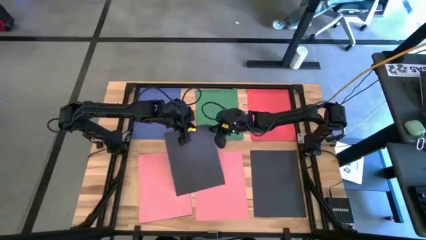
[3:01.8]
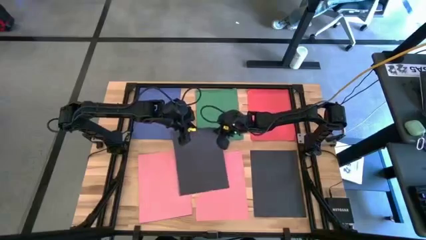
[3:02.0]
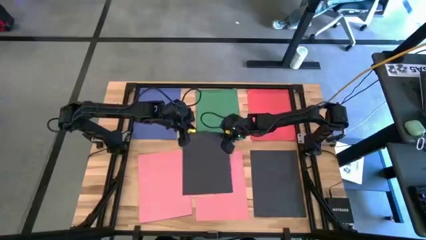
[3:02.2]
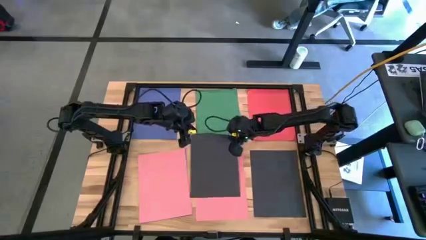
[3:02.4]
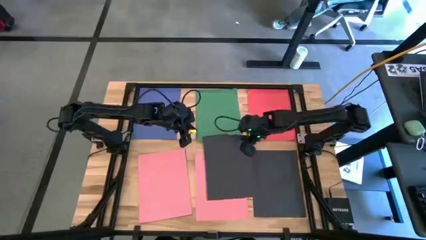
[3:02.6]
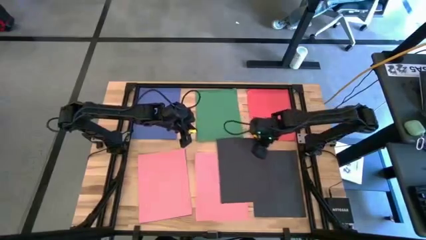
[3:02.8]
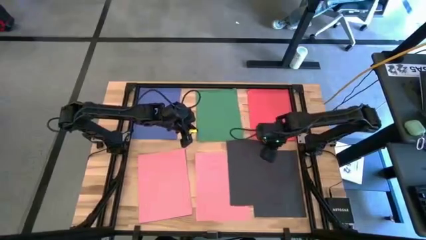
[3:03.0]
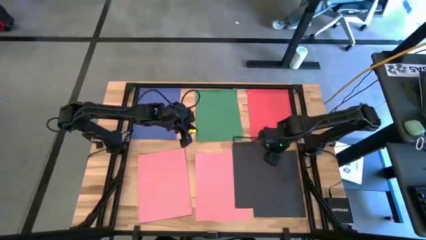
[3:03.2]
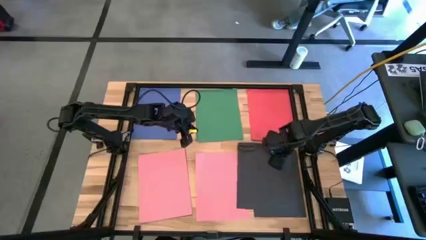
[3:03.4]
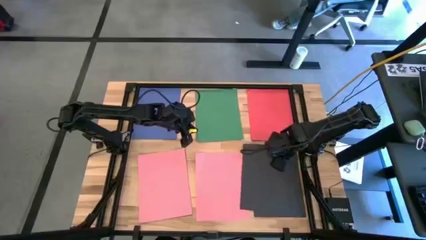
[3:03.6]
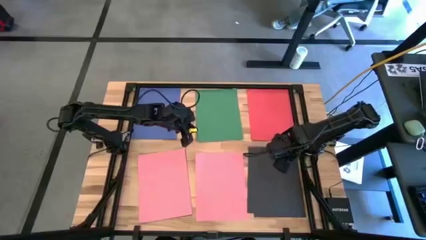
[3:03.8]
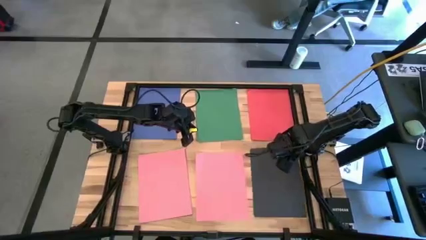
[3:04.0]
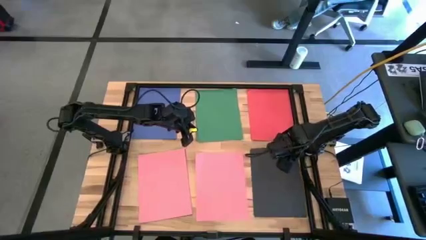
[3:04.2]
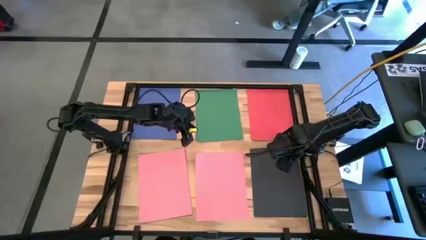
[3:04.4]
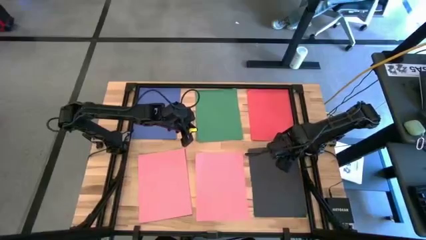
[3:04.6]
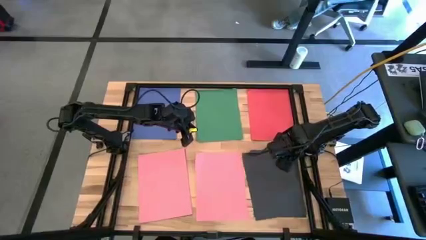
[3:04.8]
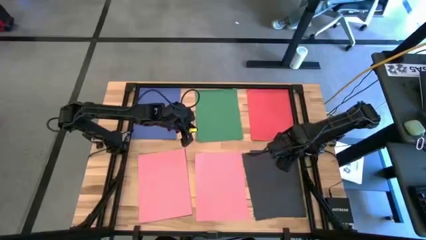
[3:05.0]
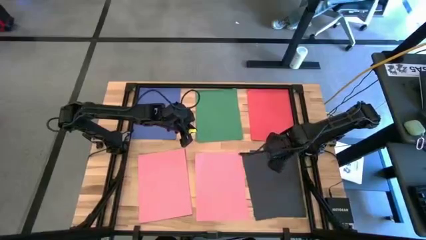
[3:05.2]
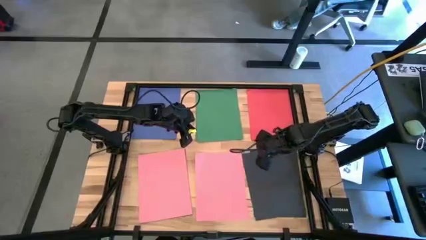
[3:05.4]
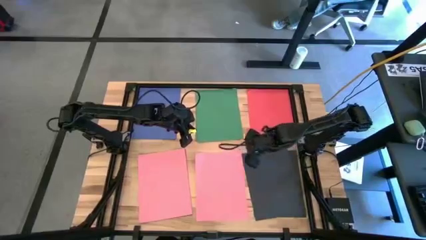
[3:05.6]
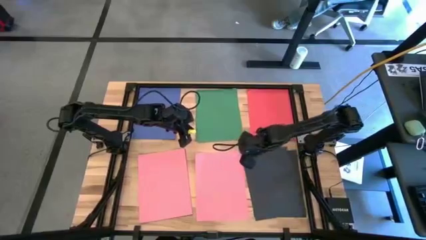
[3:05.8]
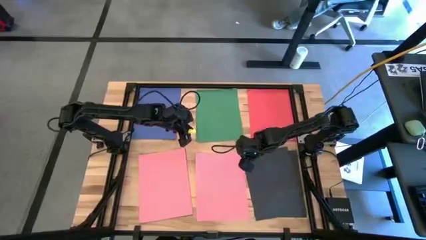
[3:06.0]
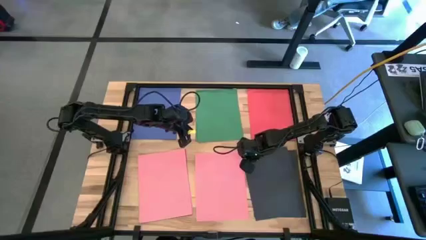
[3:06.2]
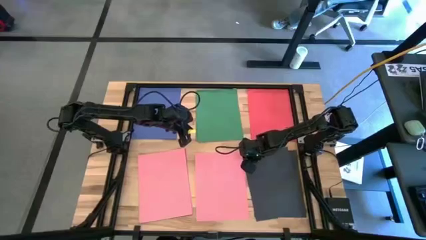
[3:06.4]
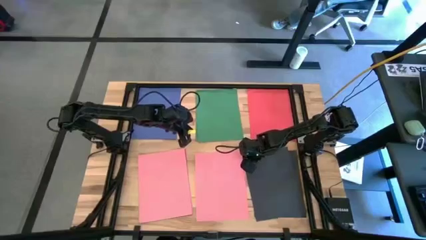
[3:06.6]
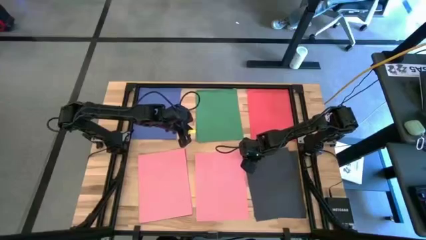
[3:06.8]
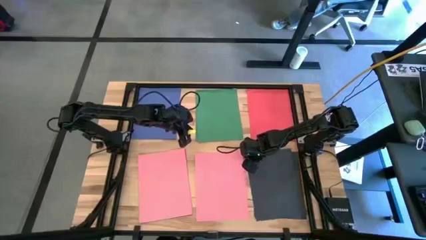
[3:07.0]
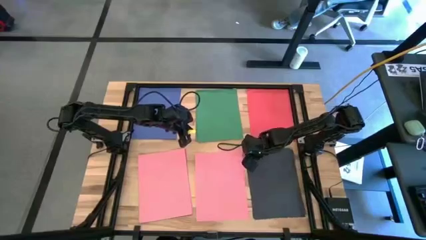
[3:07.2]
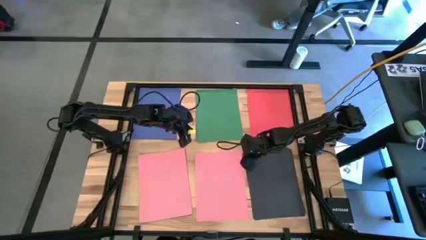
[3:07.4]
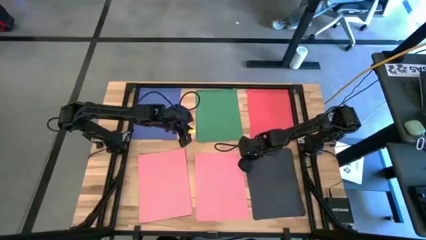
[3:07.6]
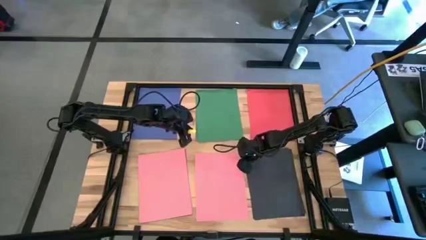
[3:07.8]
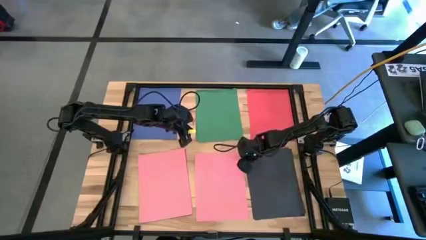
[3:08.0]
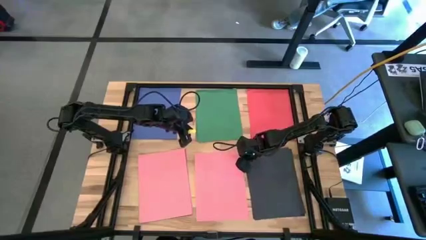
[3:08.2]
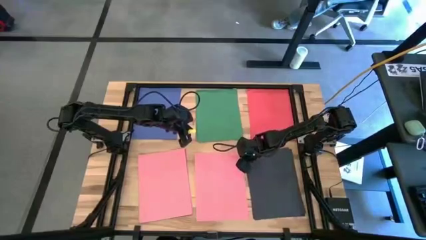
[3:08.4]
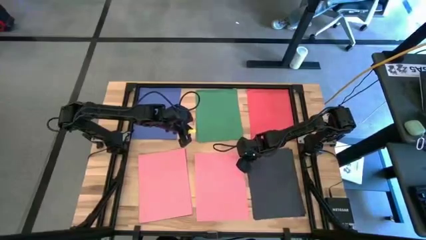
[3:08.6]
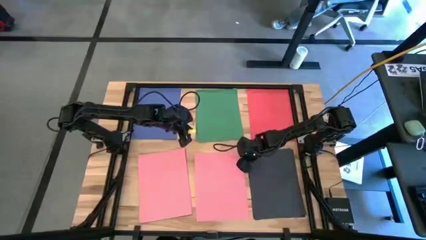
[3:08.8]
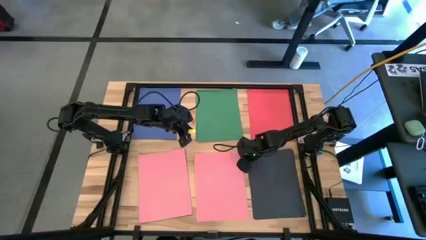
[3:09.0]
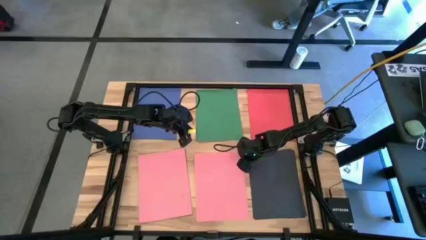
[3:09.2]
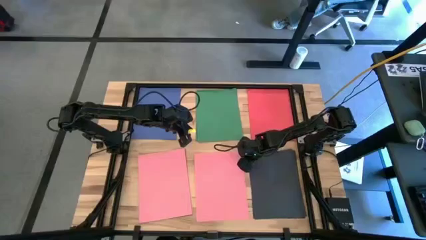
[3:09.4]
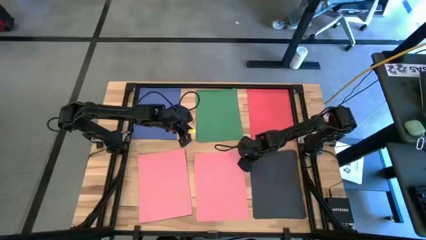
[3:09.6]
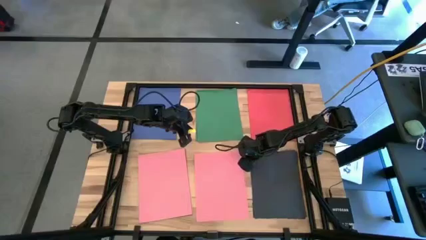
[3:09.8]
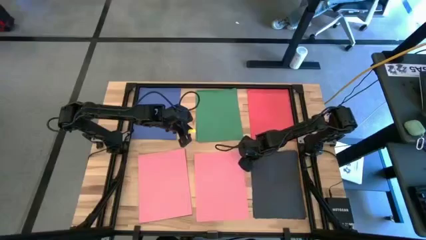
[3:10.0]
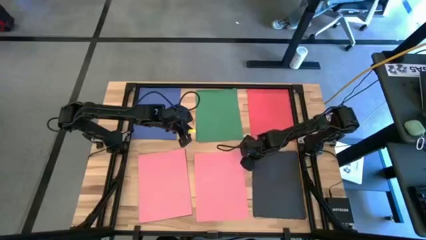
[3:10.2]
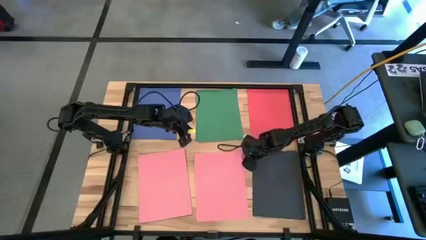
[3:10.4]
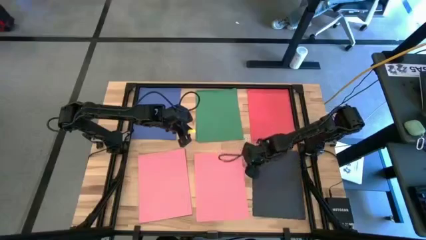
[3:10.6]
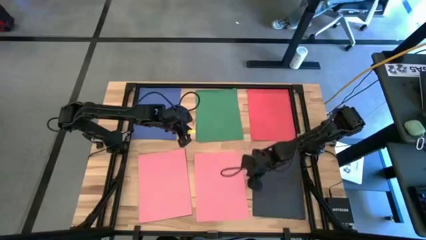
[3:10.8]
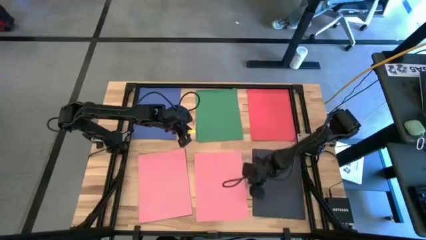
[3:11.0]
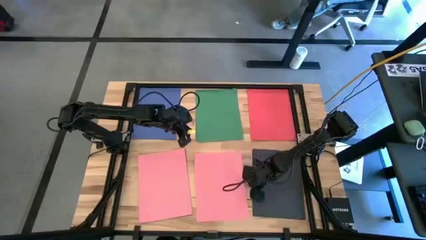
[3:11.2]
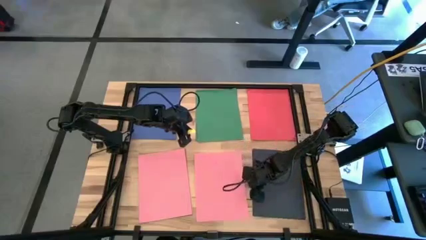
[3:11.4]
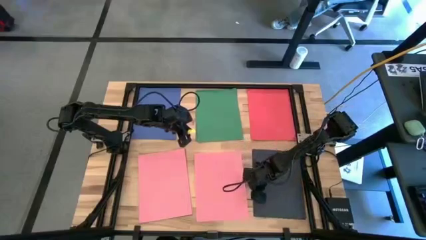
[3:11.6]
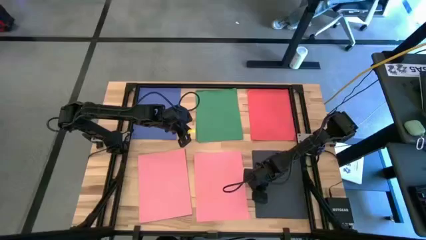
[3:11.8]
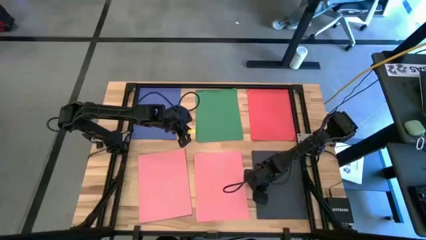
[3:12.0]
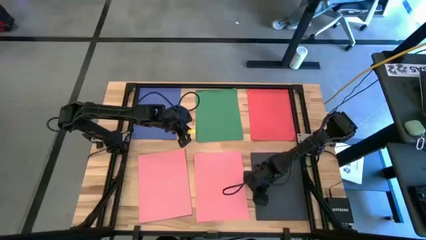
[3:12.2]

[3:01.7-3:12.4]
Task: Organize paper
Stack the black paper on top of the other black paper

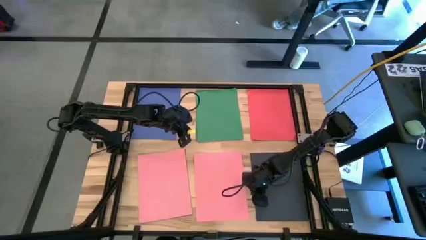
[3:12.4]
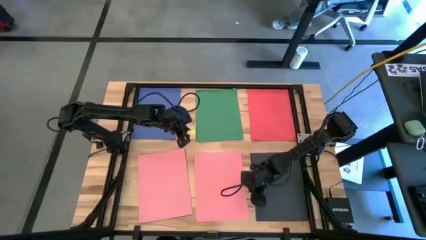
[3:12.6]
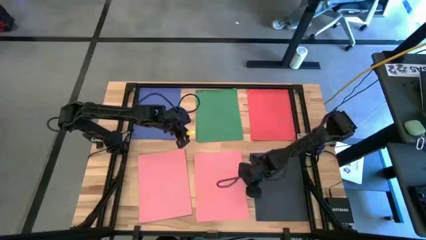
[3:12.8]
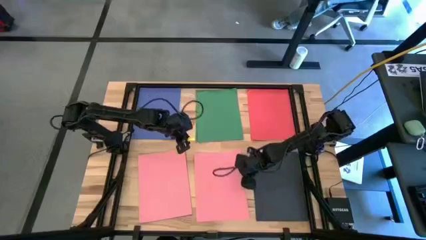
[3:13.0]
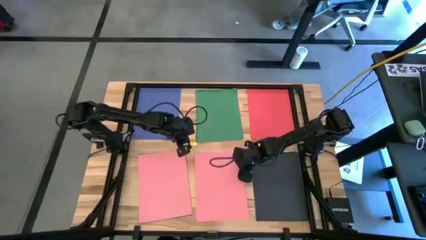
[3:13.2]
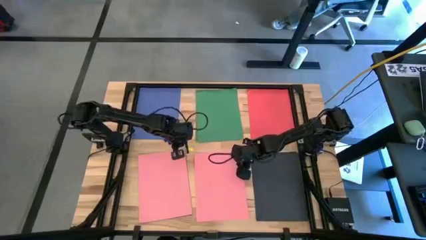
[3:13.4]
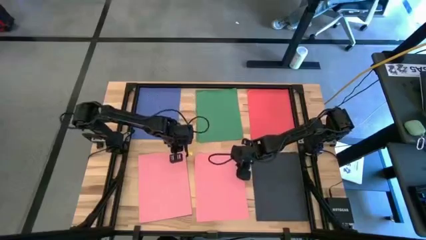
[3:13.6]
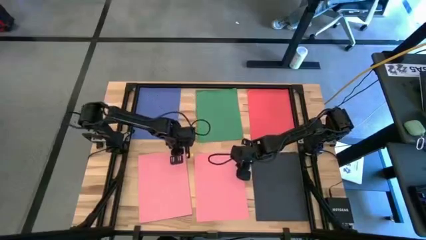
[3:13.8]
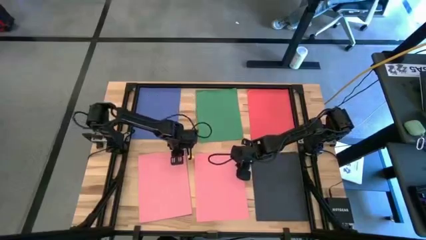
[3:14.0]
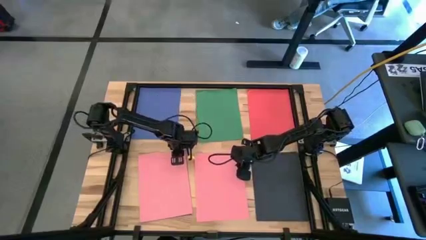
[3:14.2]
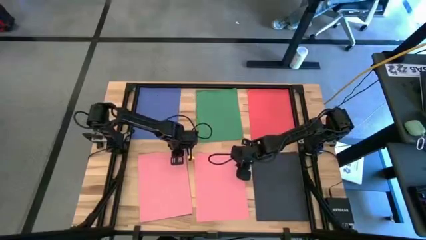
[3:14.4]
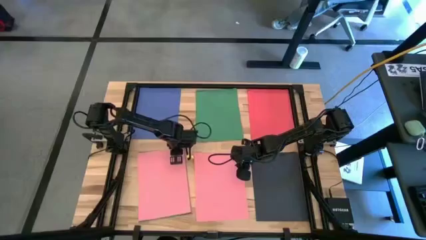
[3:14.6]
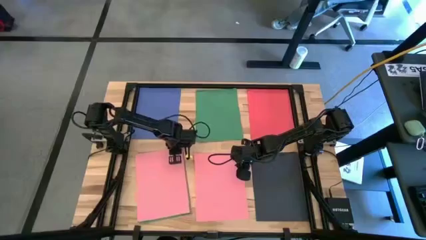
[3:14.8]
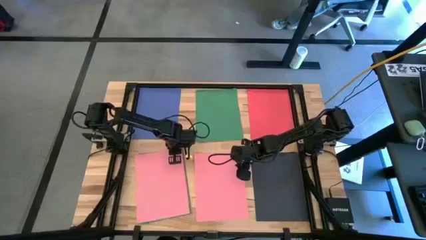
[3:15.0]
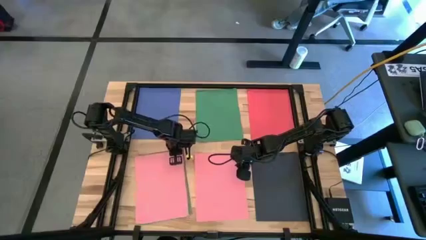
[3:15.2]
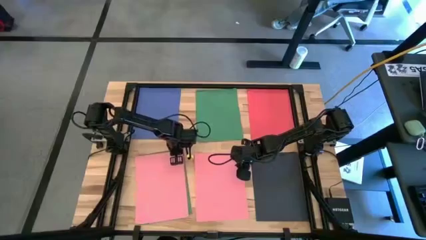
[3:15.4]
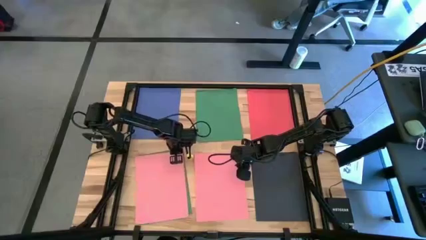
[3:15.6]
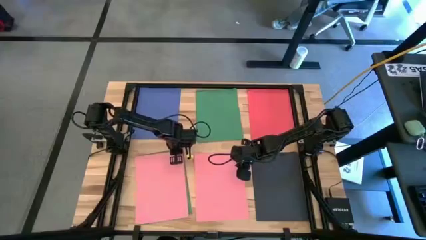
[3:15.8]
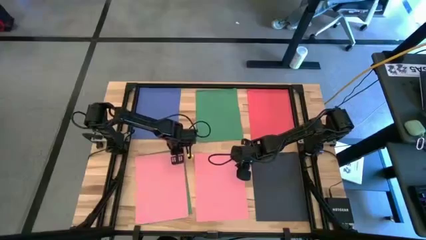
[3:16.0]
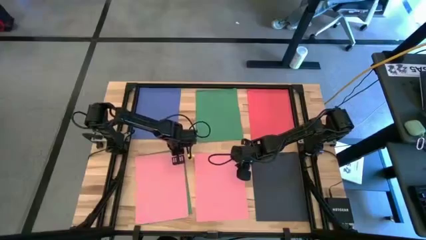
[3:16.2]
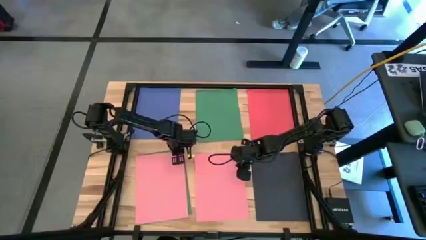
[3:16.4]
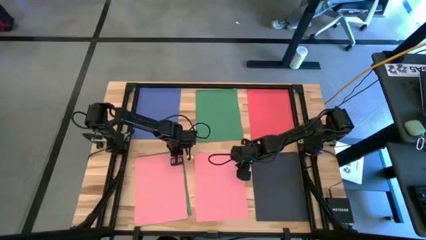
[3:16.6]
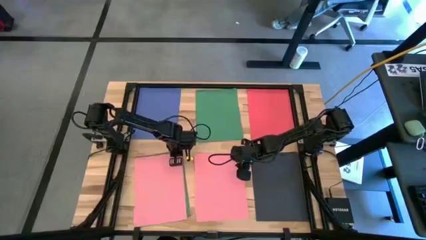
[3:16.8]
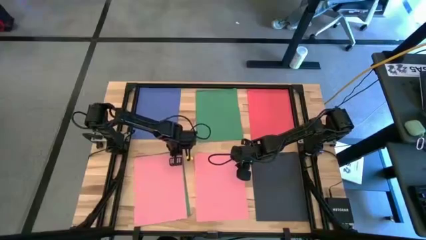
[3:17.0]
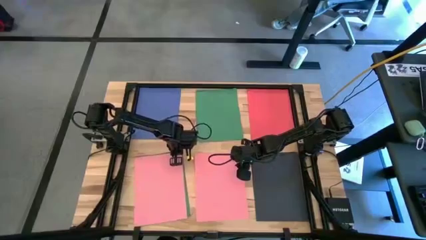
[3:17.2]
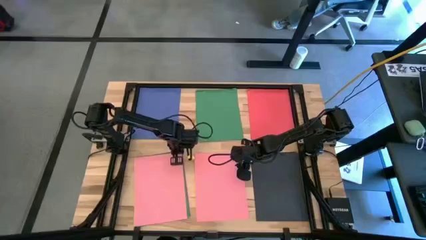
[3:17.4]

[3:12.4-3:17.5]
Stack the pink paper on top of the other pink paper
